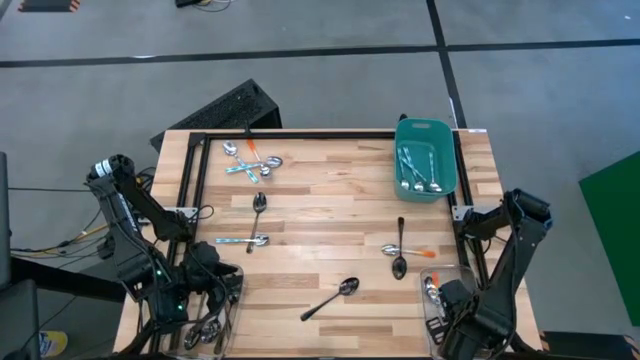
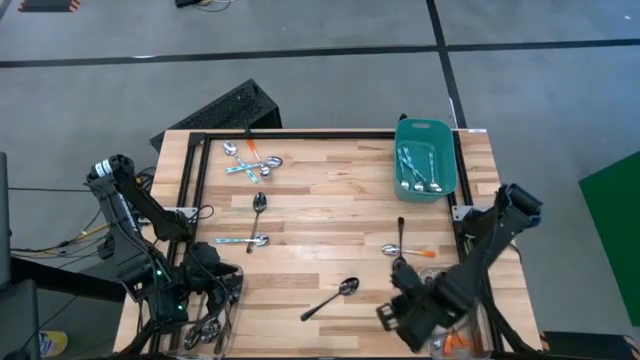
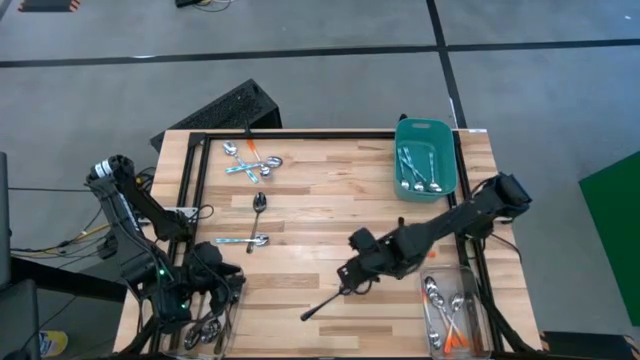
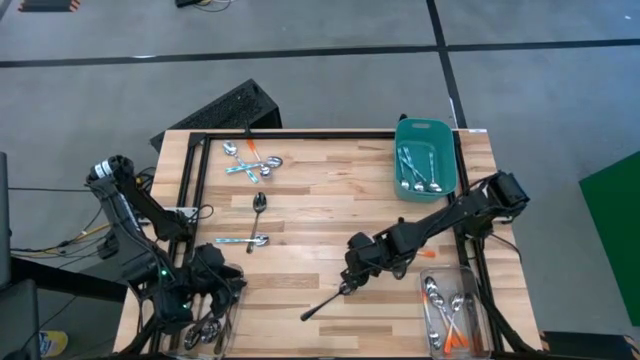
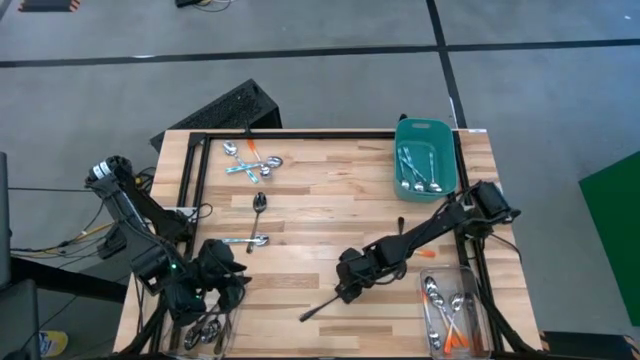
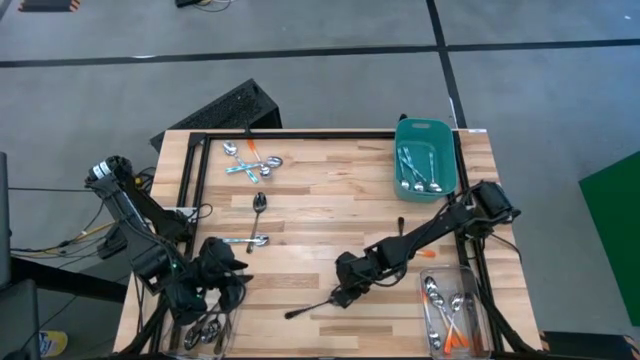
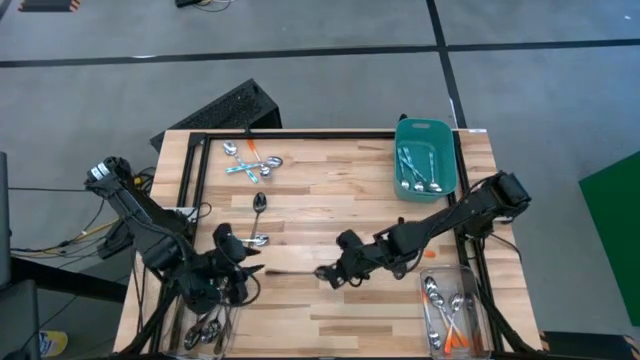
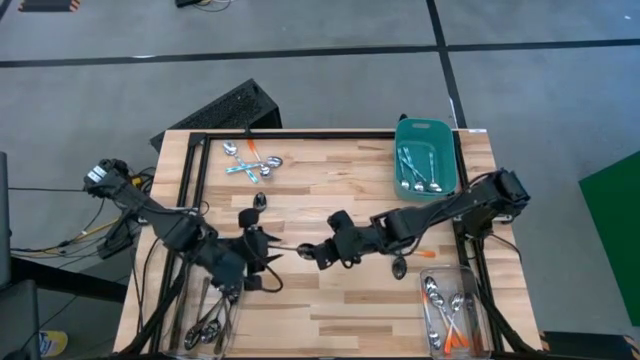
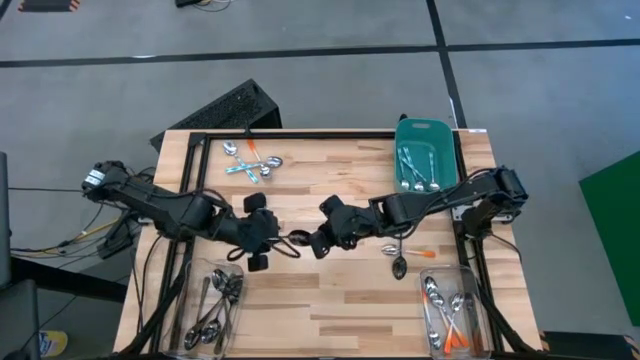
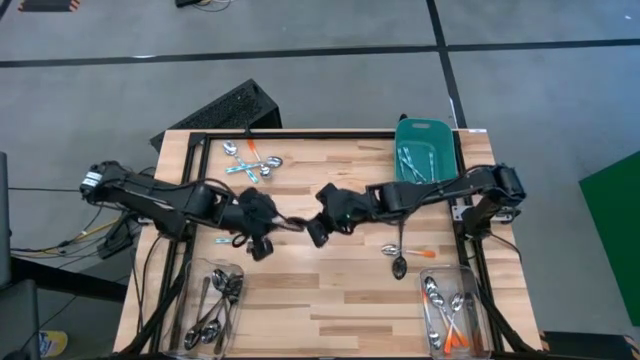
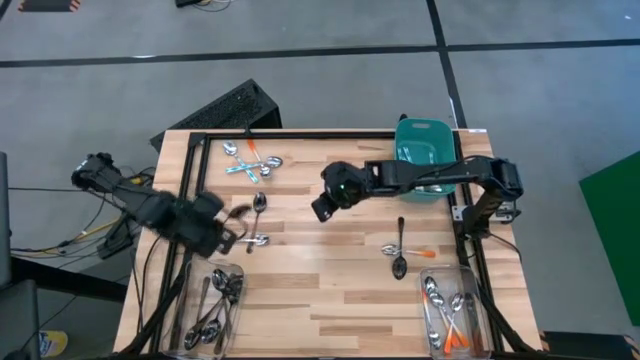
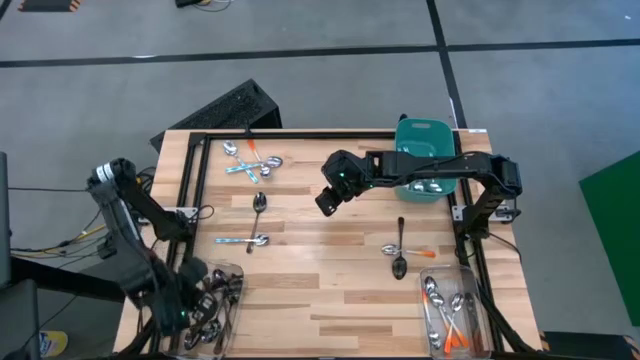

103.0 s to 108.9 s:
Task: Sort silverware by color (type)
Put the black spoon into the left transparent bin

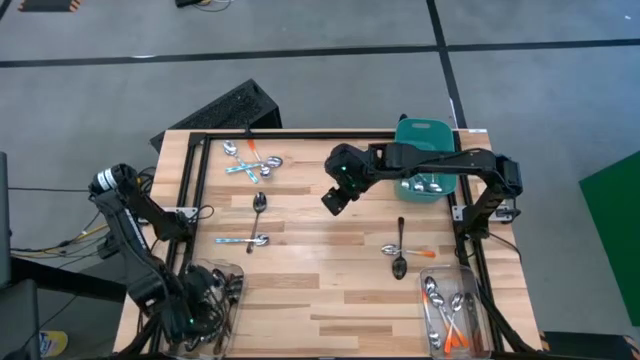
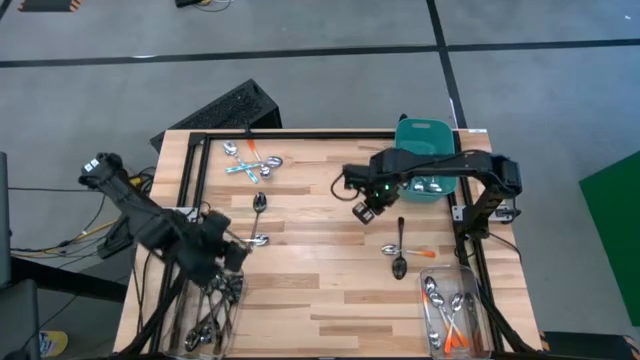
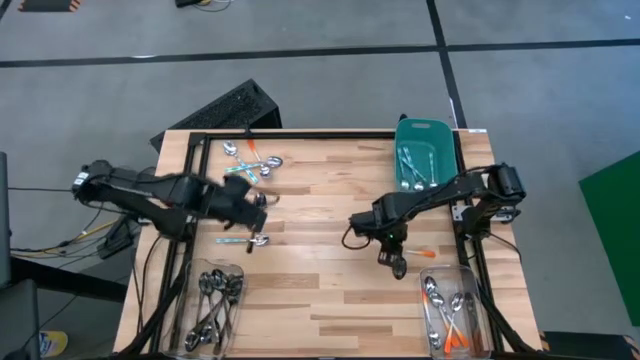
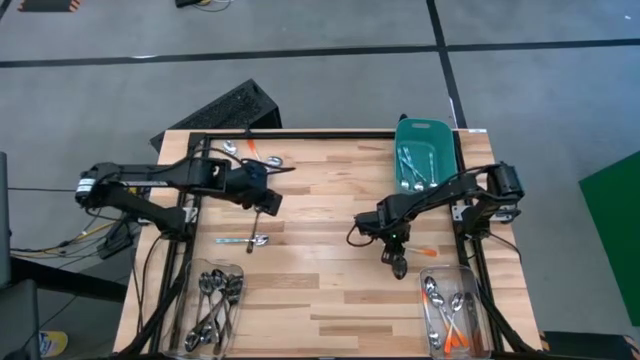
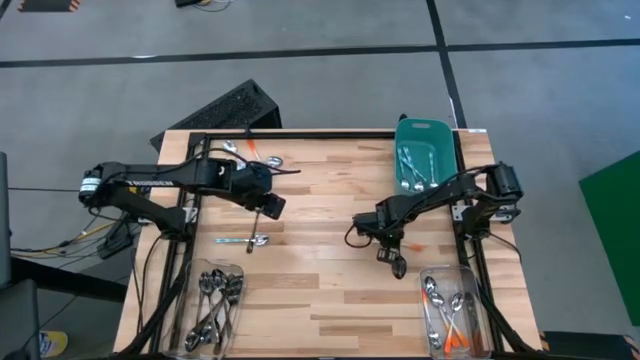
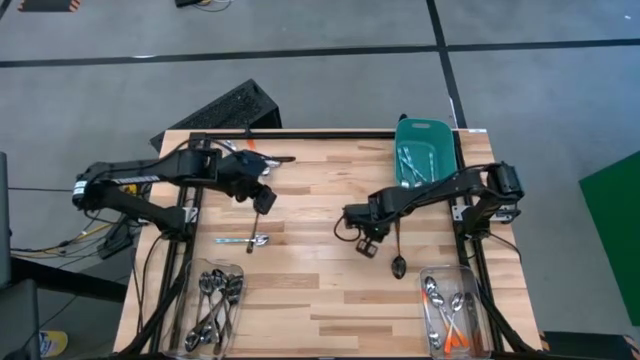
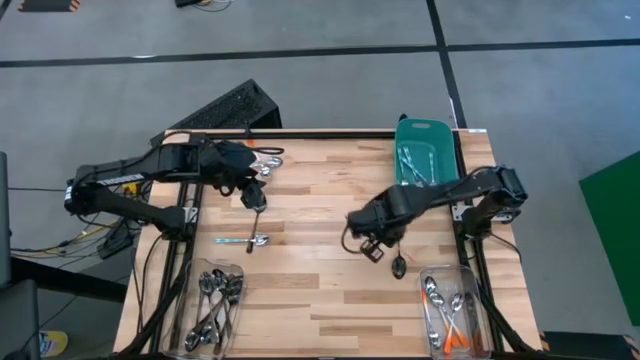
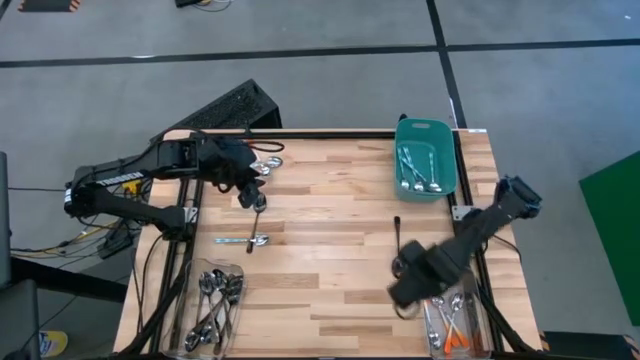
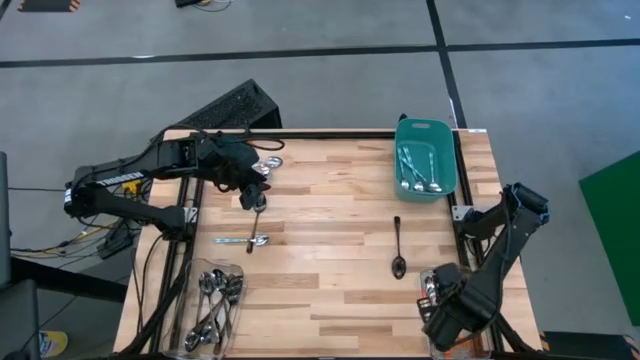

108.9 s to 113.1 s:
Put the orange spoon into the right transparent bin

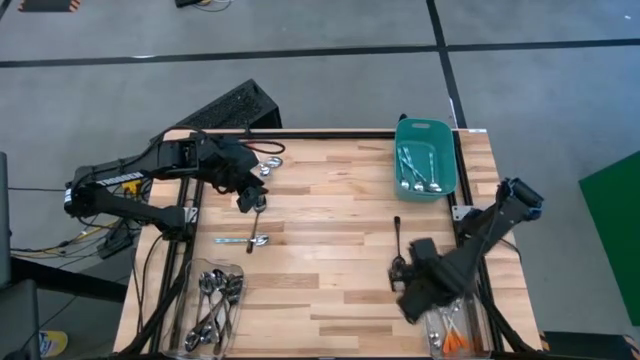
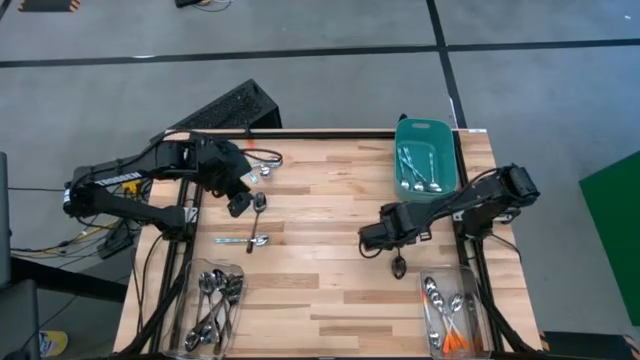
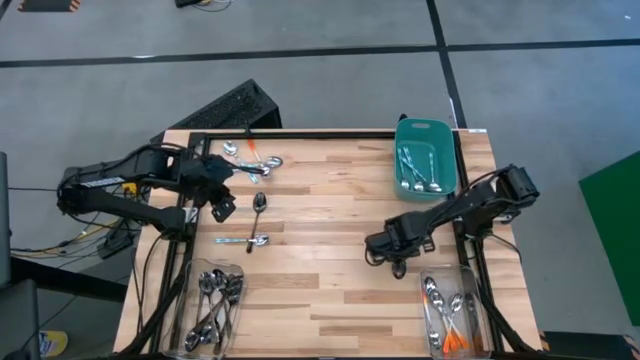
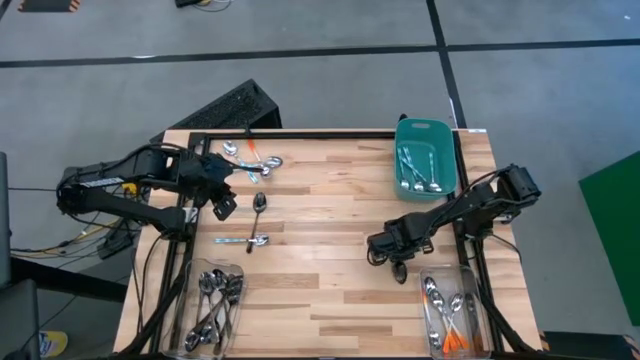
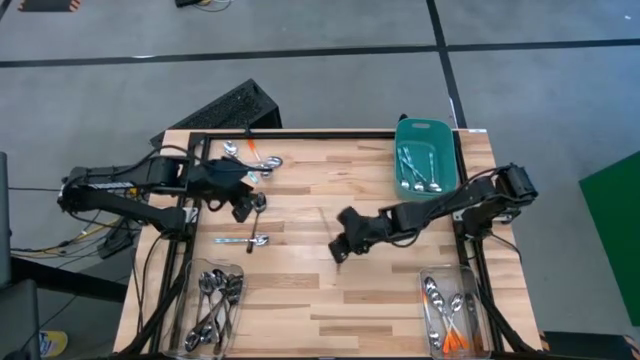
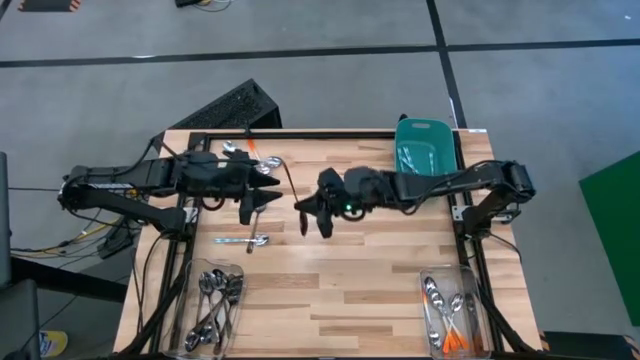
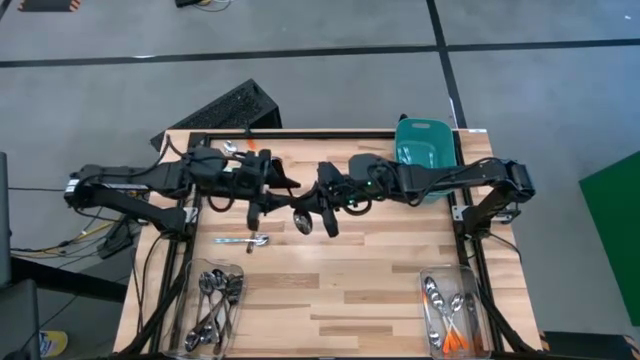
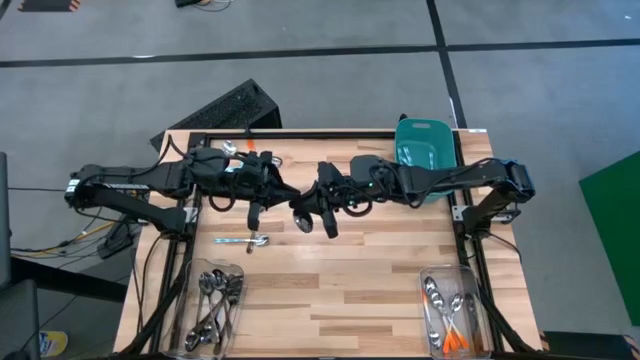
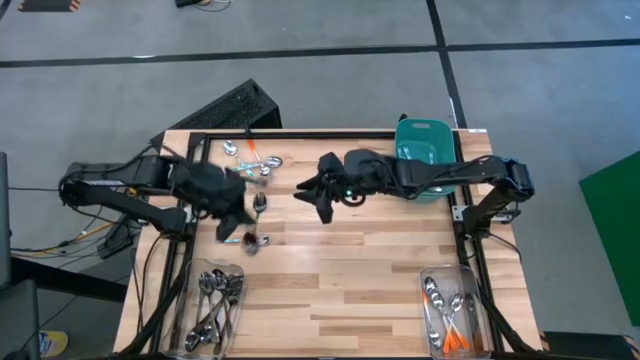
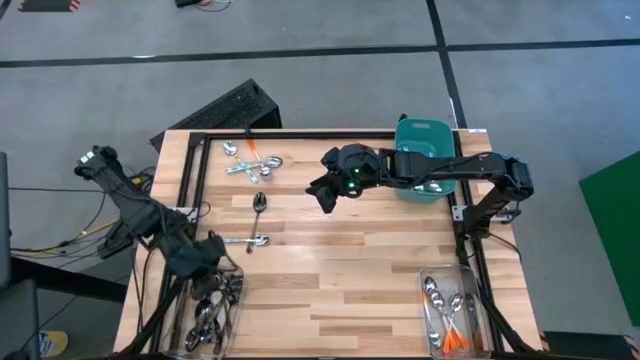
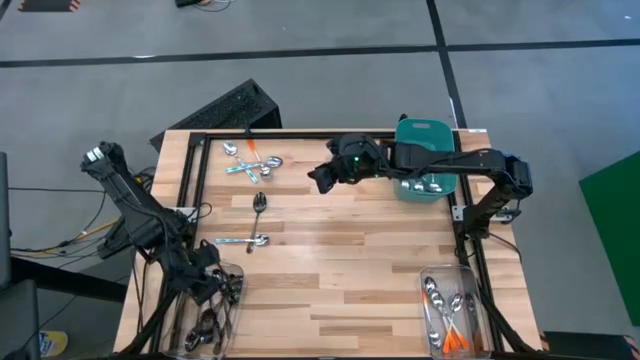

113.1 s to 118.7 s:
Put the black spoon into the left transparent bin

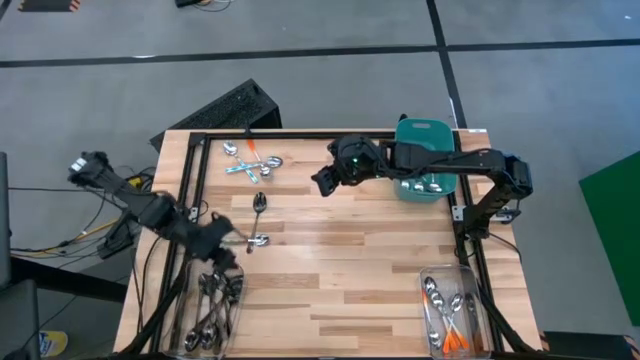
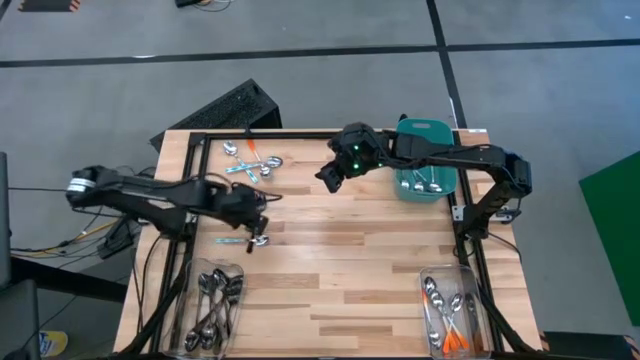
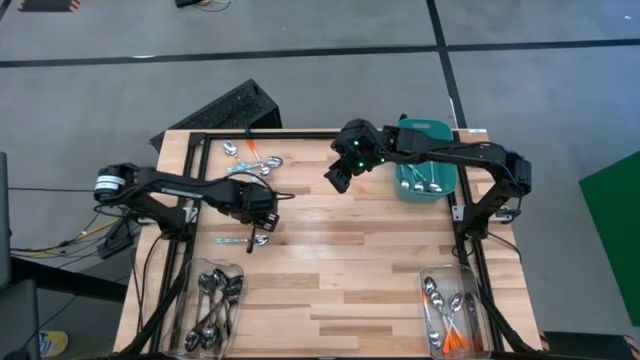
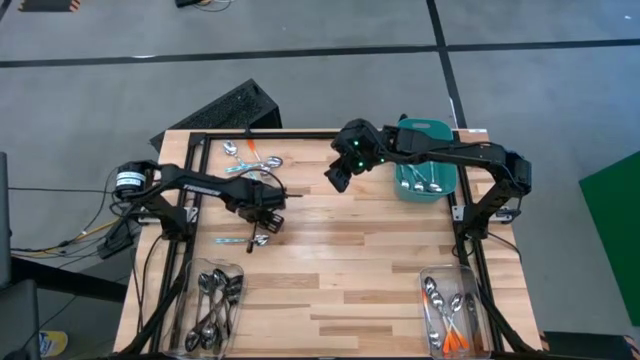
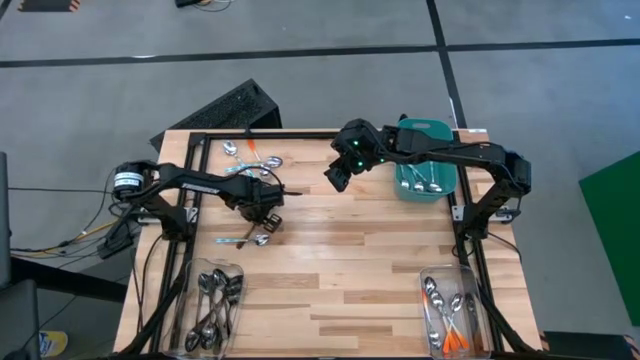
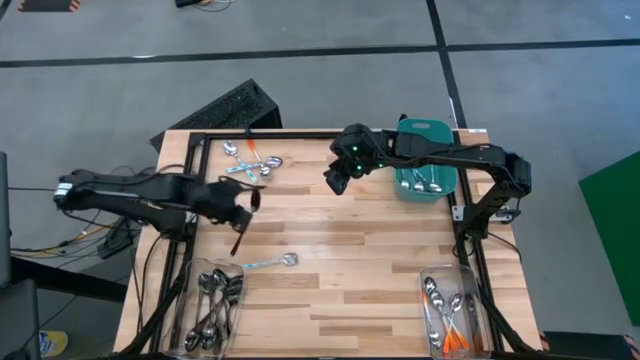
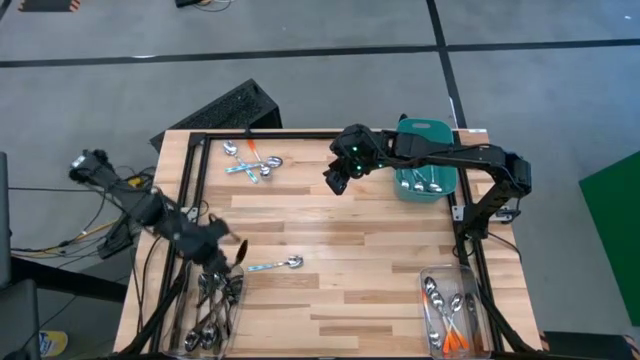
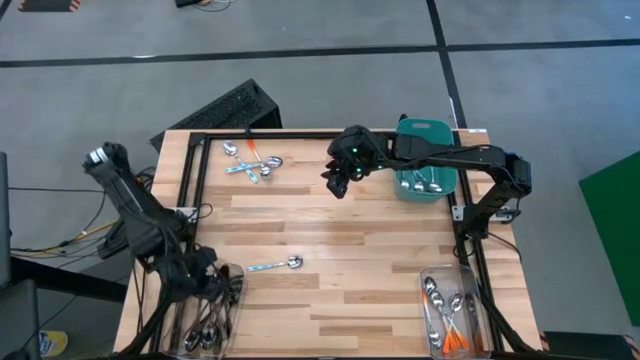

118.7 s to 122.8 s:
Put the black spoon into the left transparent bin

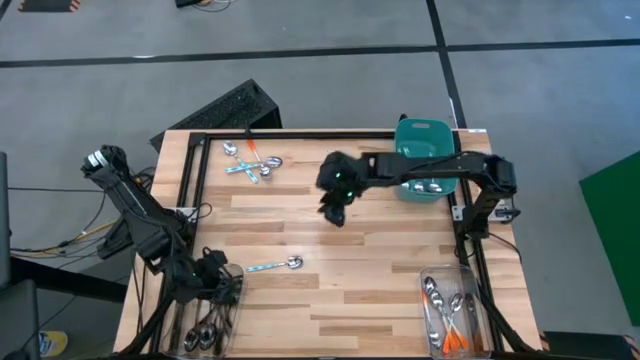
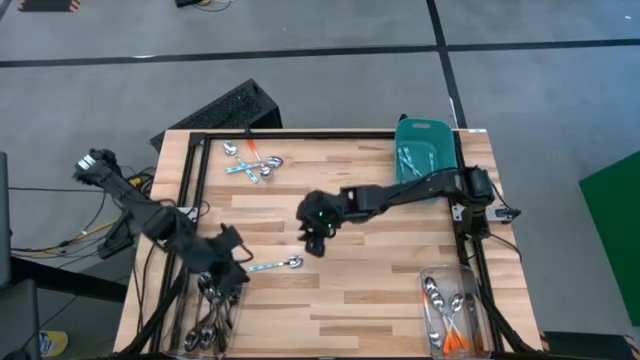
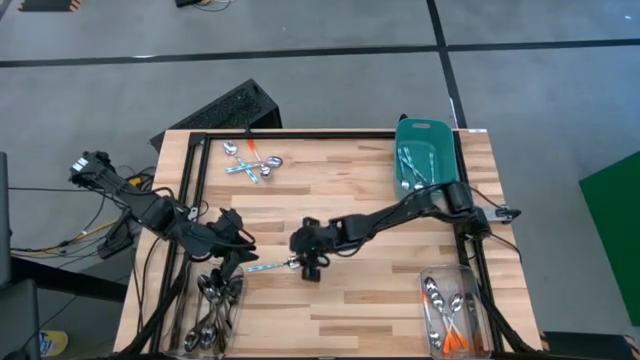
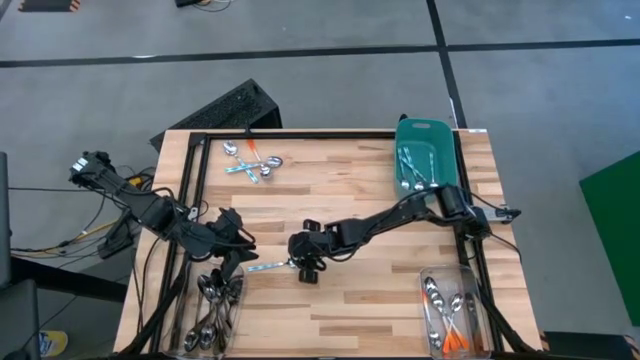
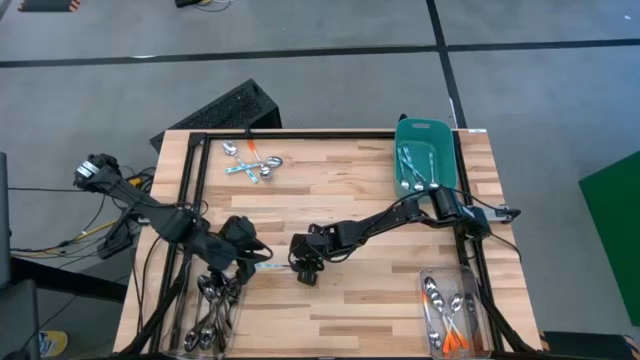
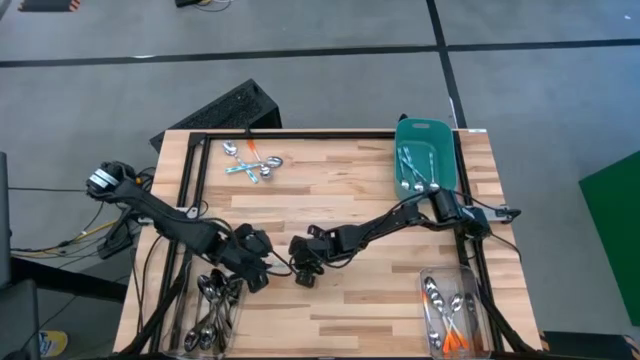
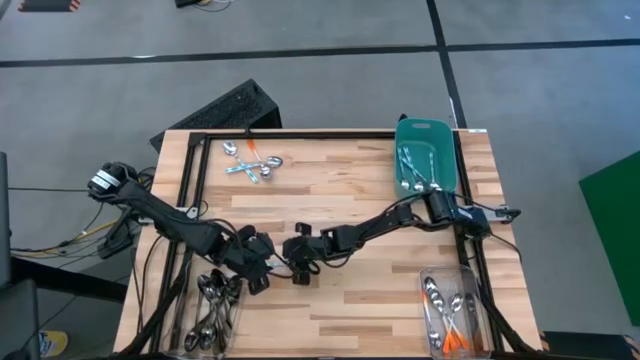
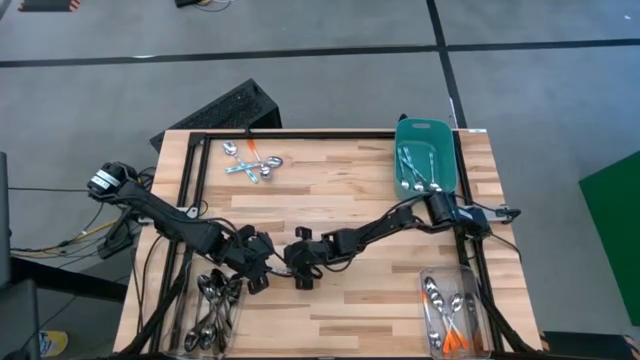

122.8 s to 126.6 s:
Put the blue spoon into the blue bin
